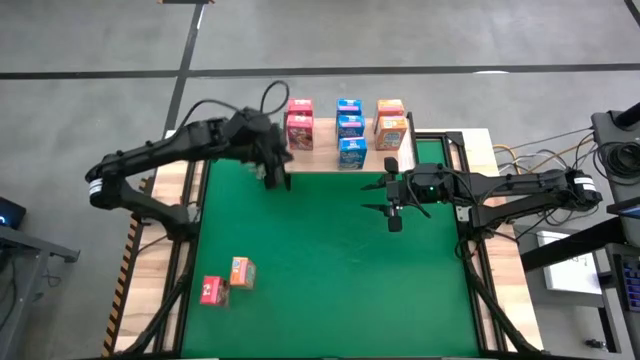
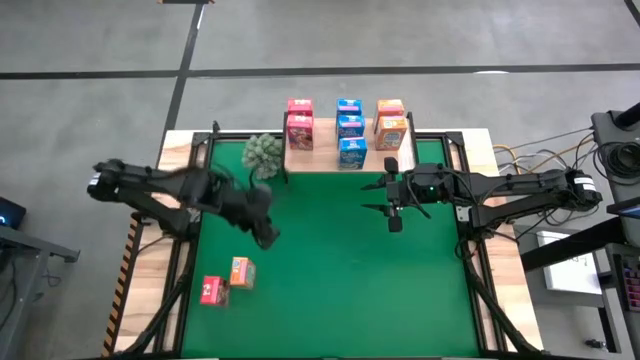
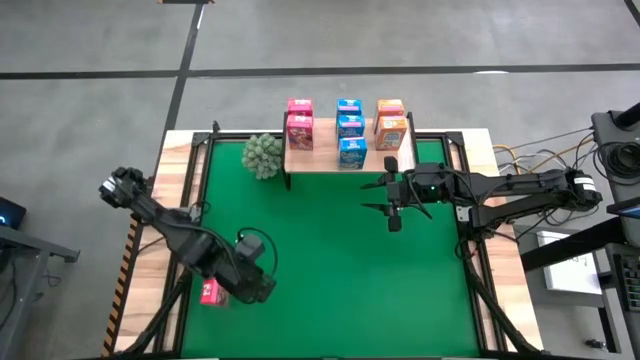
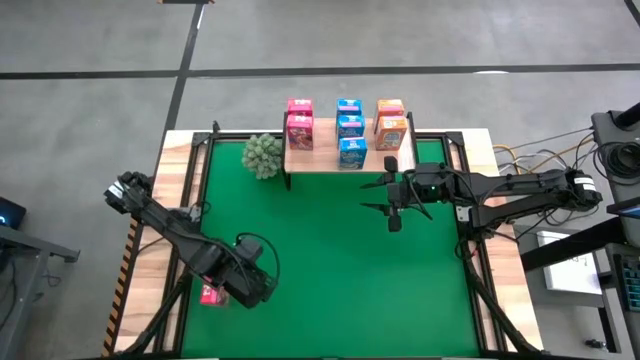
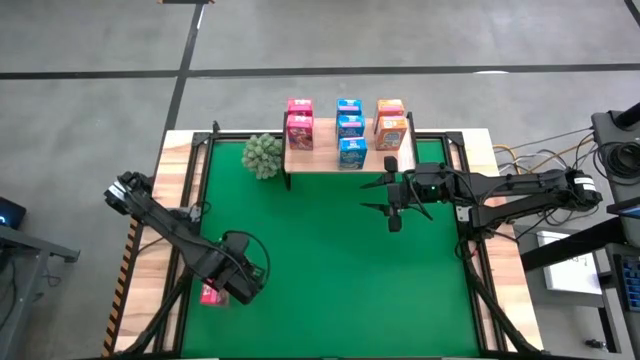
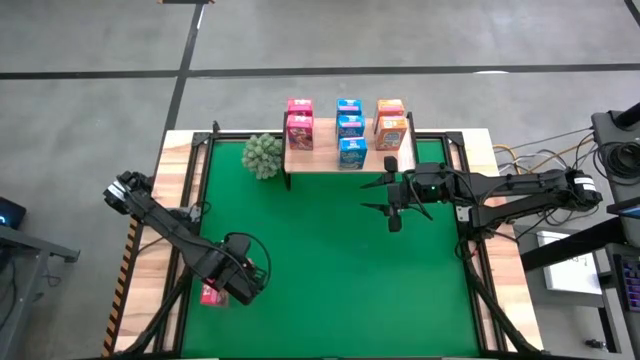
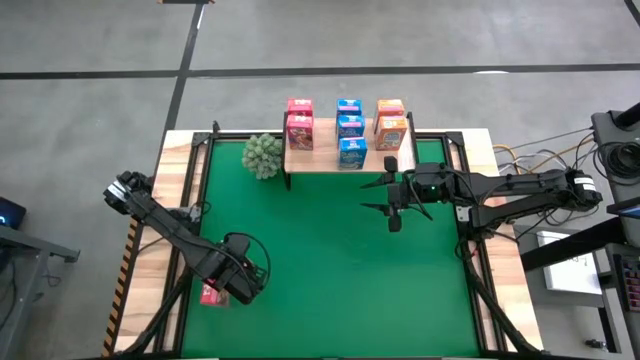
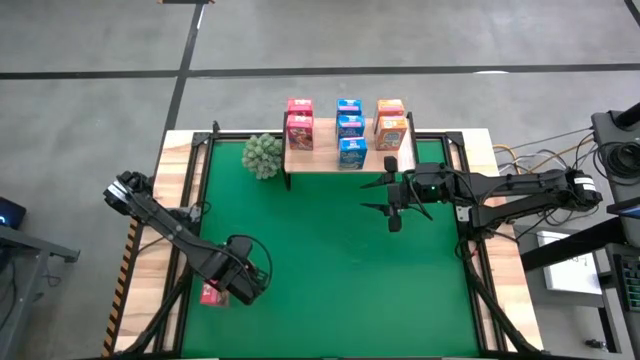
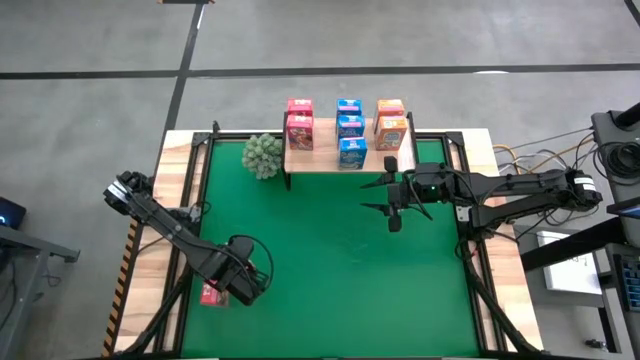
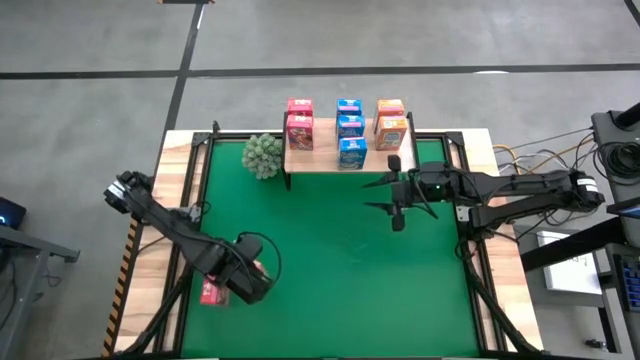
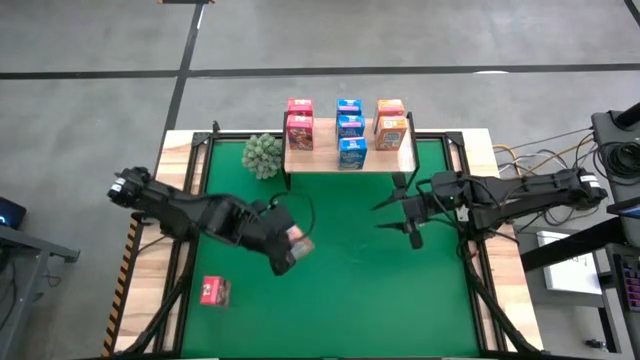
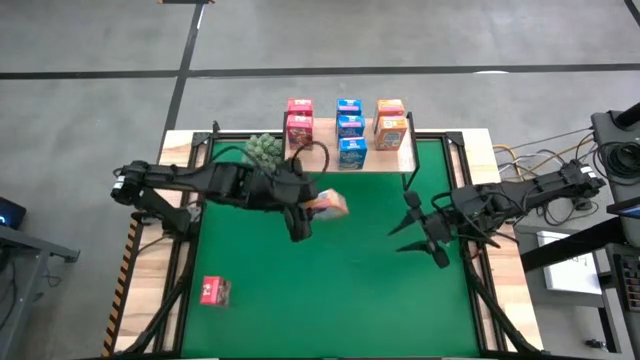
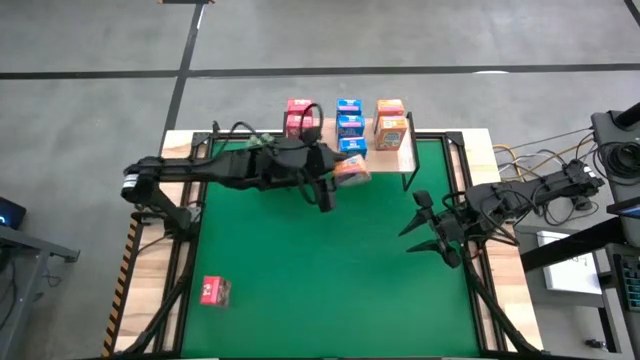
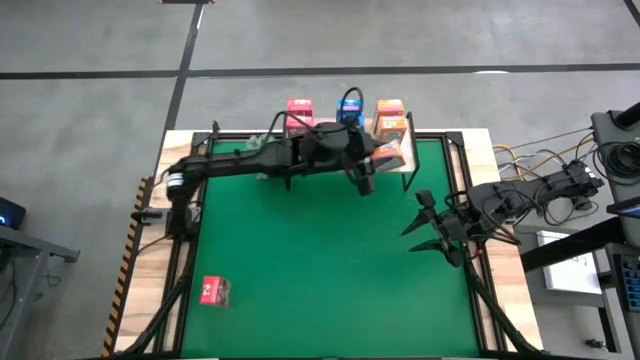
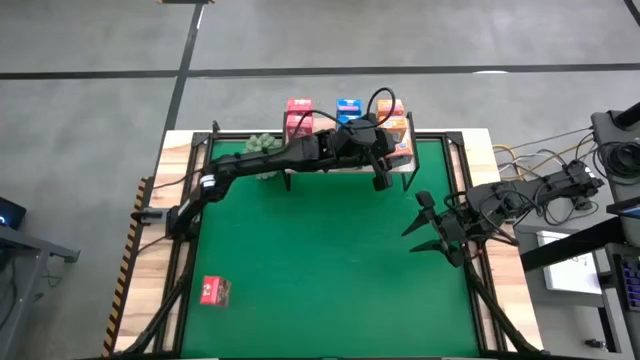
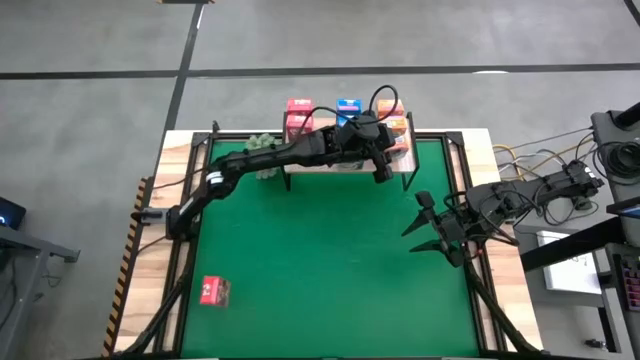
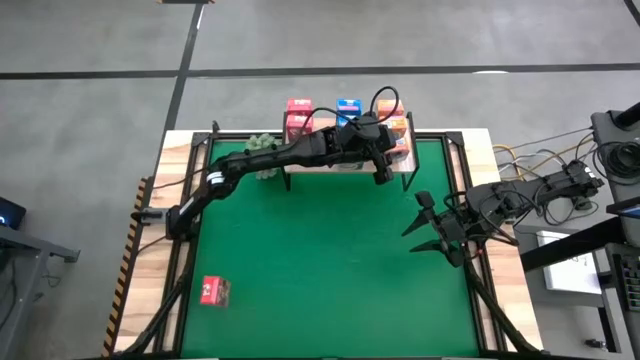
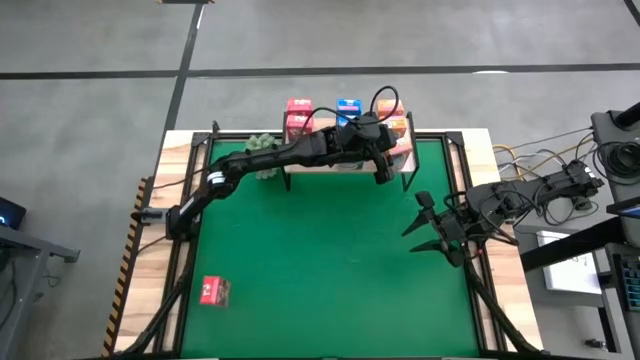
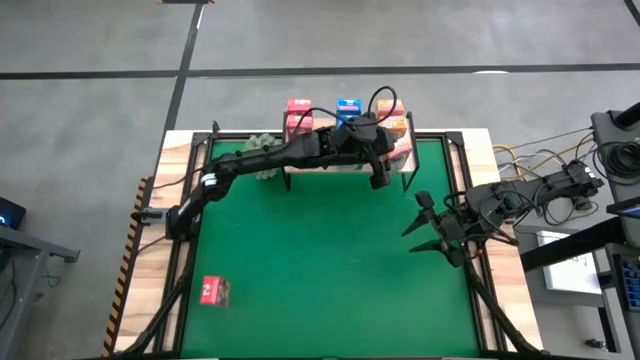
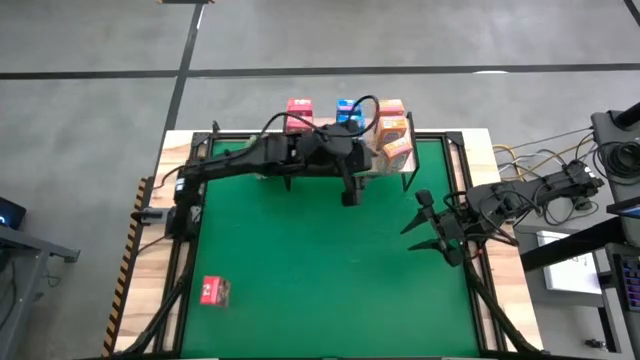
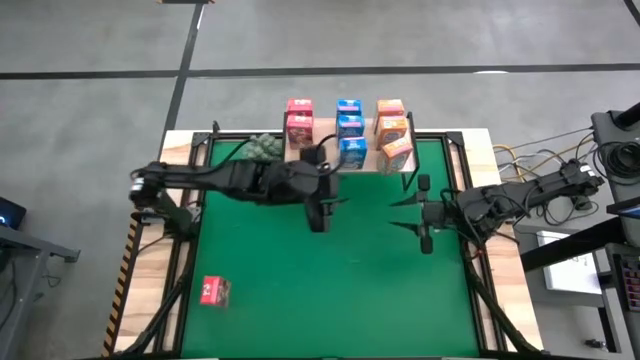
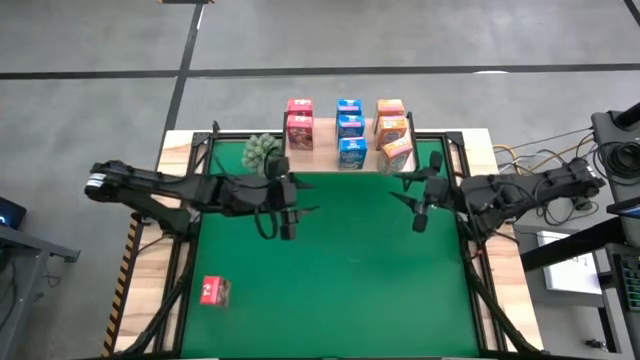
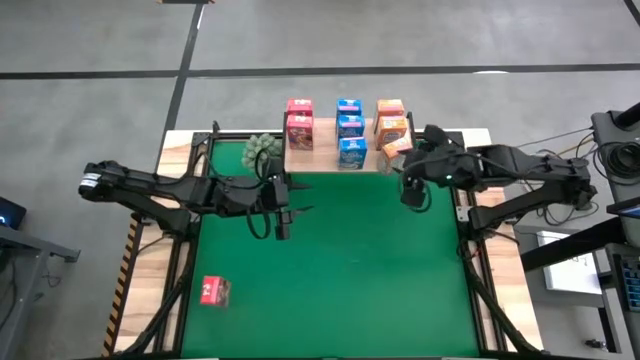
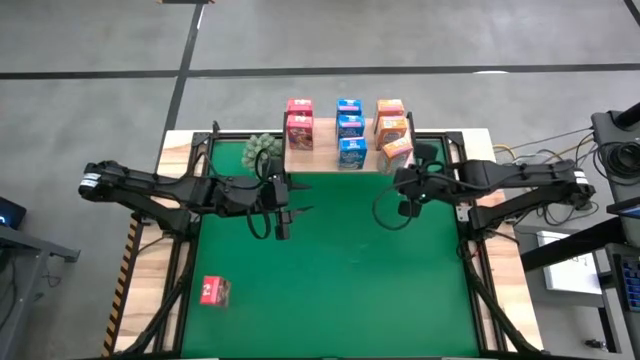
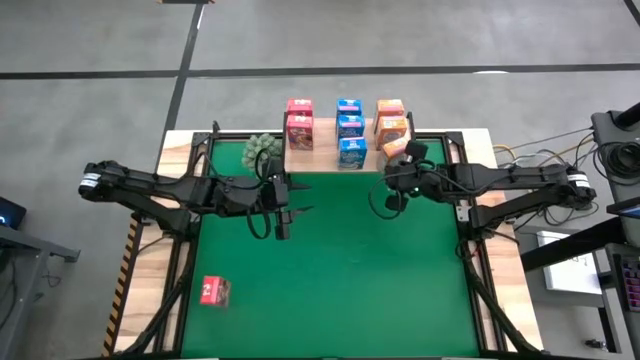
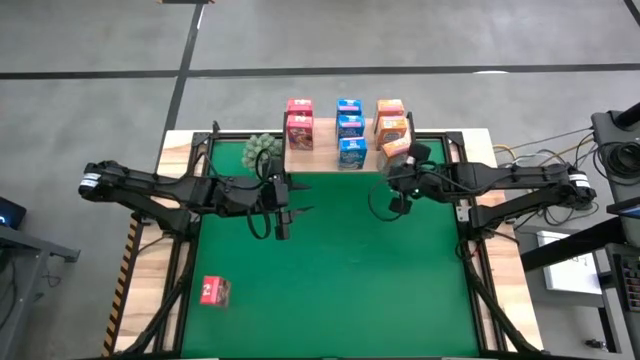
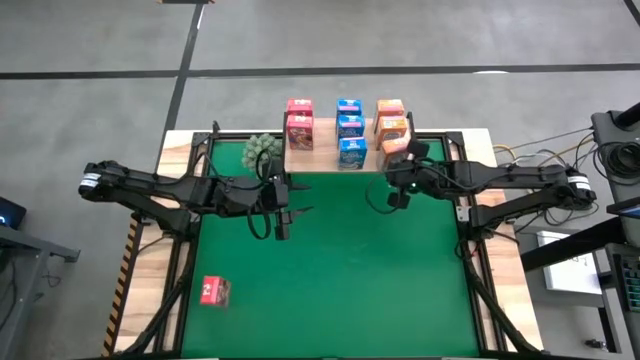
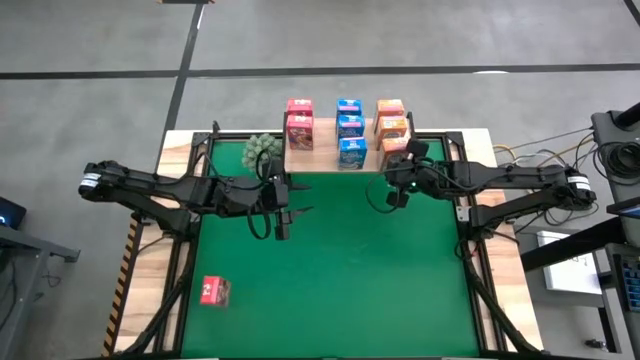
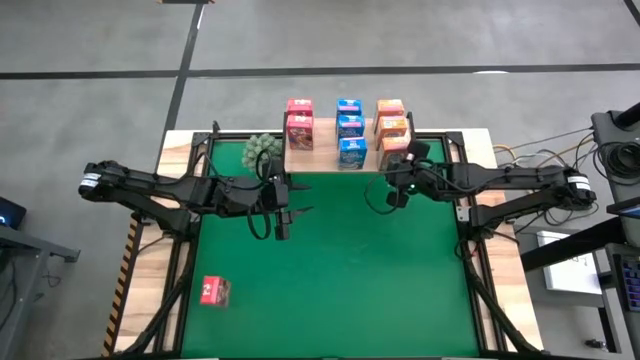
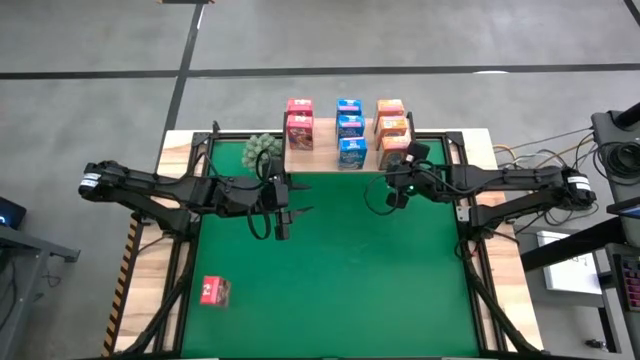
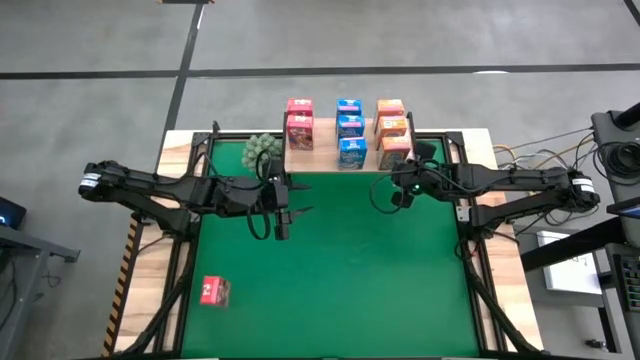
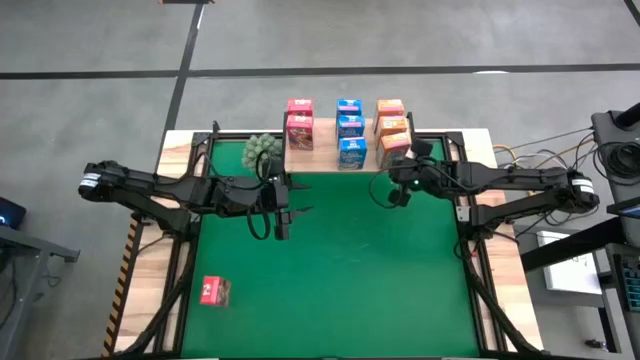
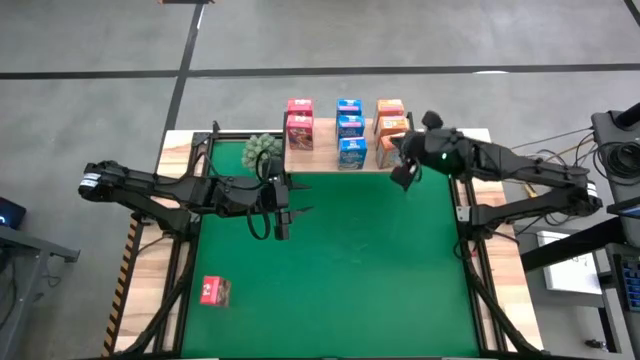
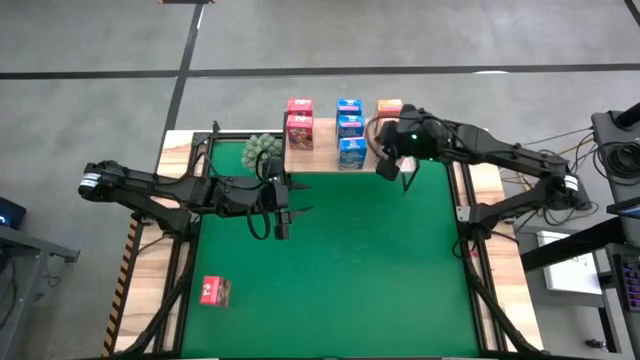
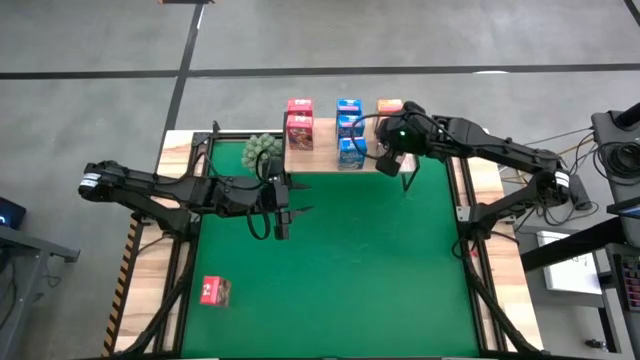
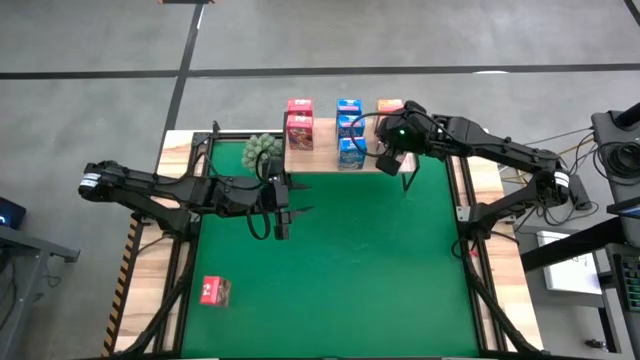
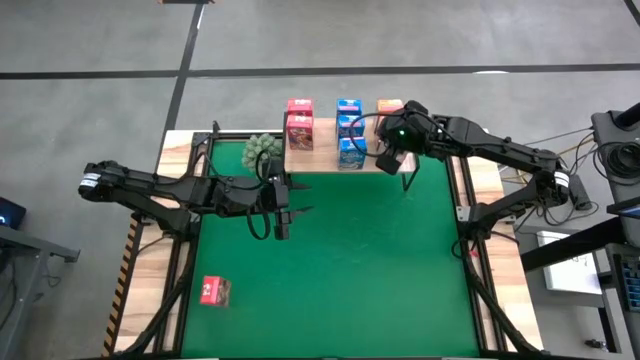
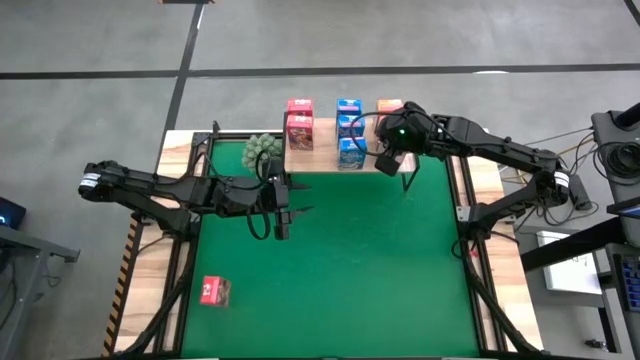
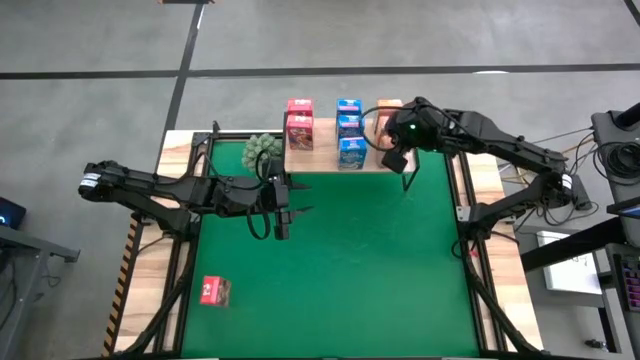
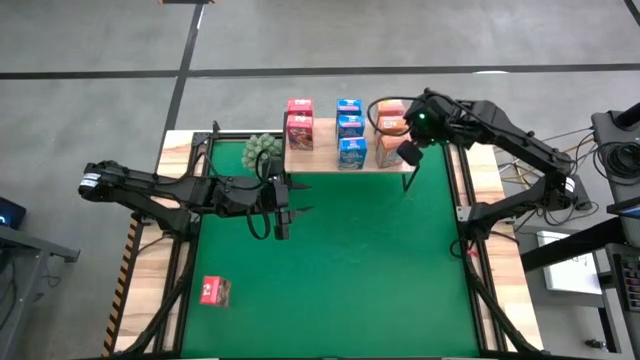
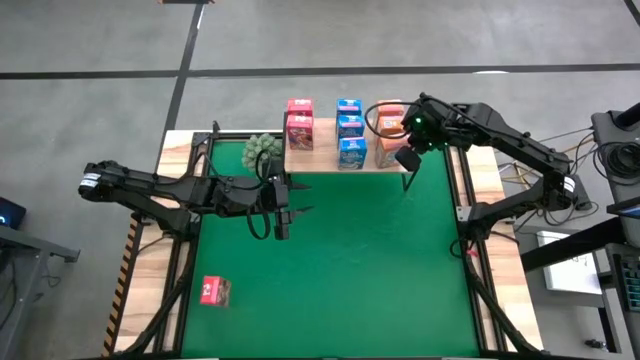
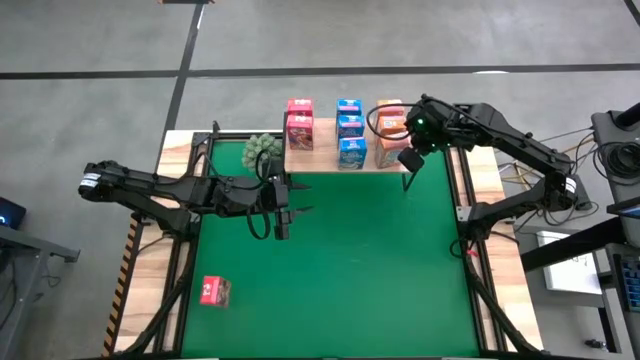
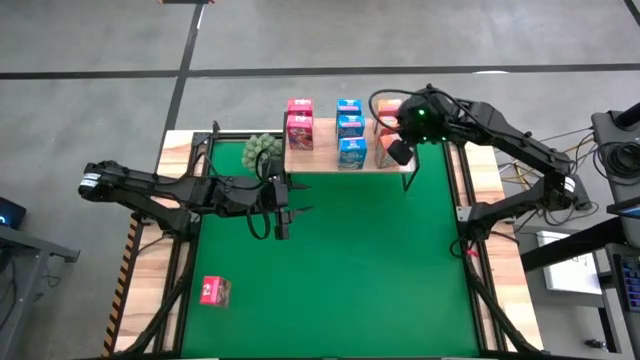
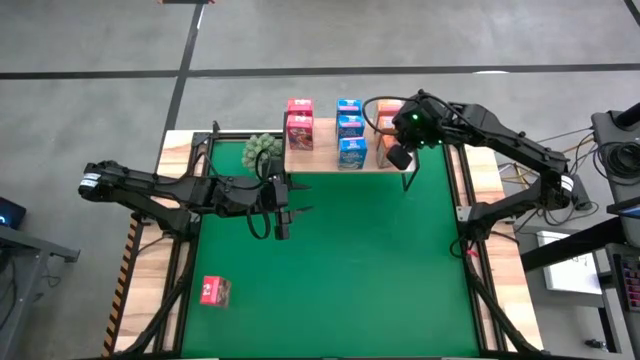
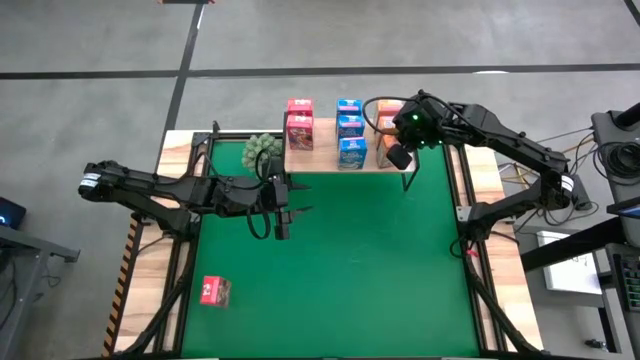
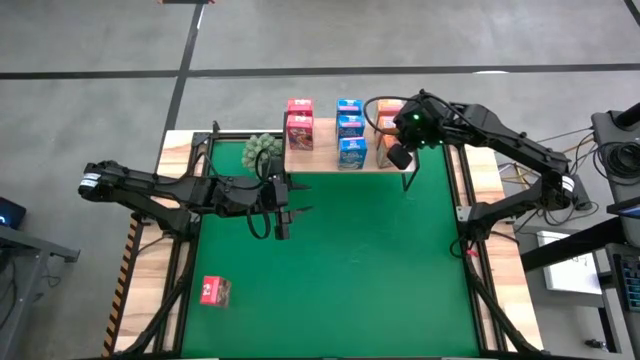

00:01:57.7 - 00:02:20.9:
Task: Stack cereal on shelf
Put the orange cereal box on the shelf aligned with the other orange cereal box
